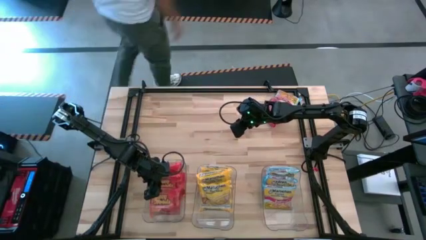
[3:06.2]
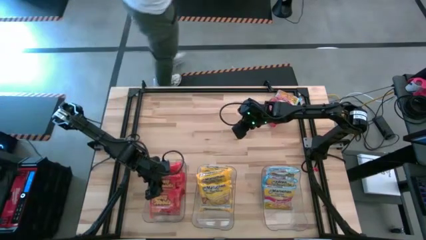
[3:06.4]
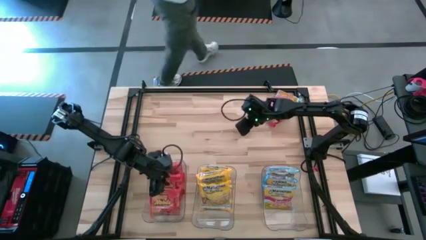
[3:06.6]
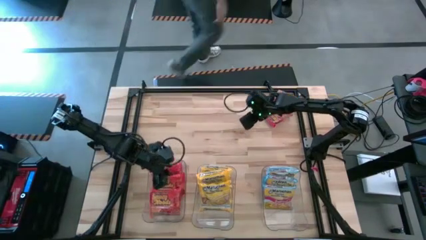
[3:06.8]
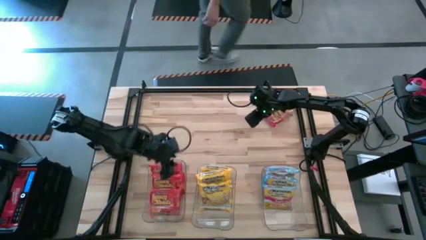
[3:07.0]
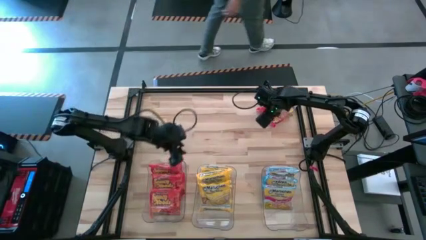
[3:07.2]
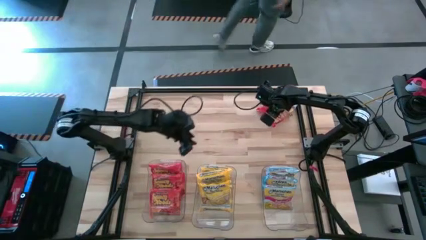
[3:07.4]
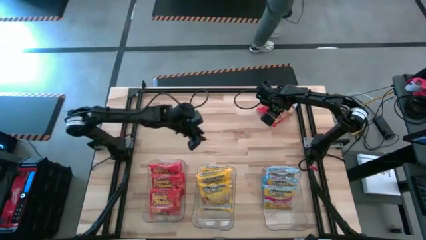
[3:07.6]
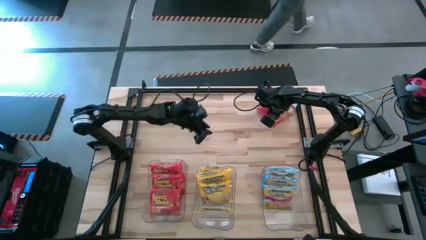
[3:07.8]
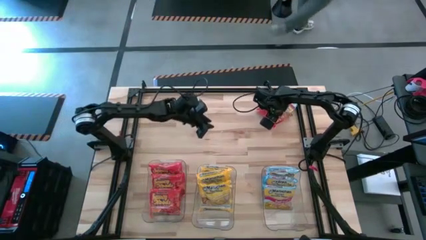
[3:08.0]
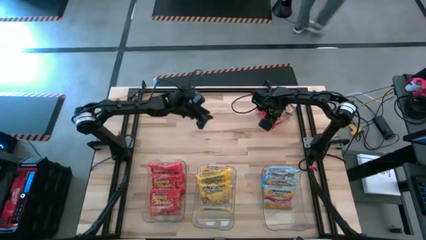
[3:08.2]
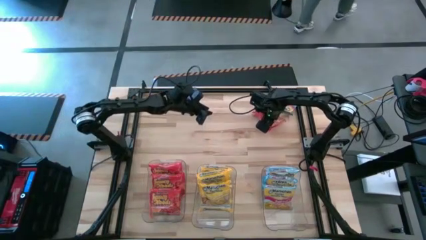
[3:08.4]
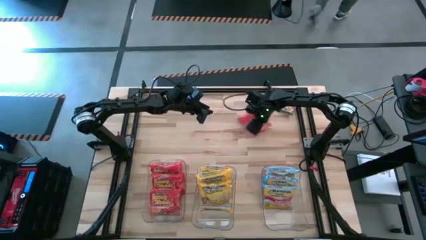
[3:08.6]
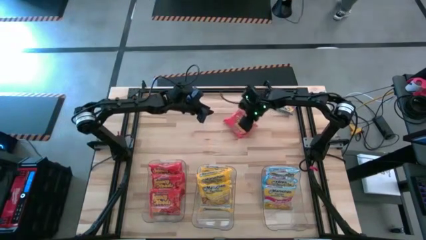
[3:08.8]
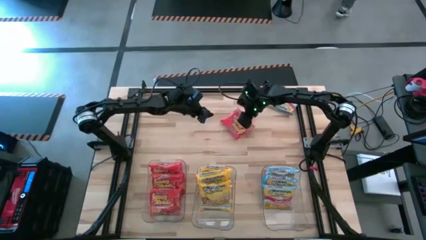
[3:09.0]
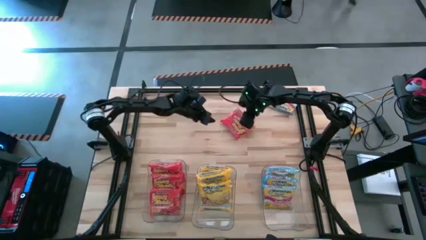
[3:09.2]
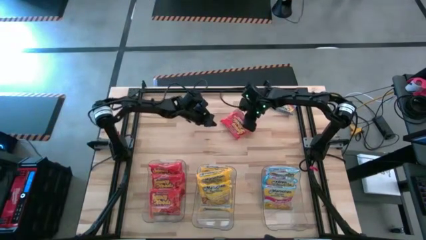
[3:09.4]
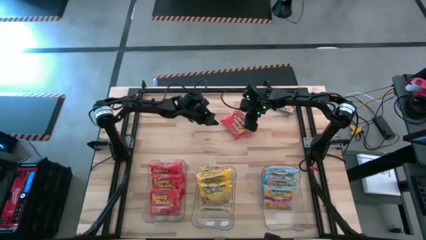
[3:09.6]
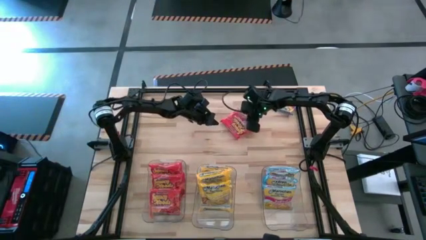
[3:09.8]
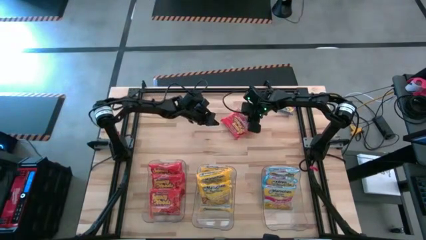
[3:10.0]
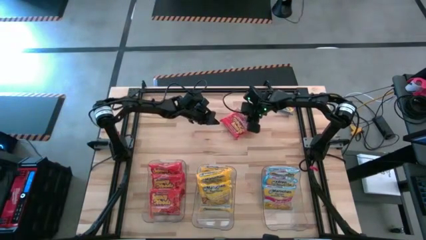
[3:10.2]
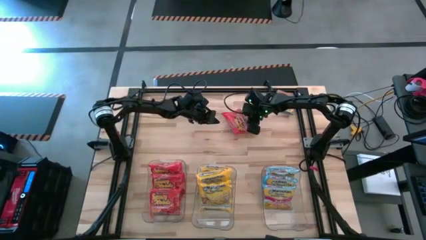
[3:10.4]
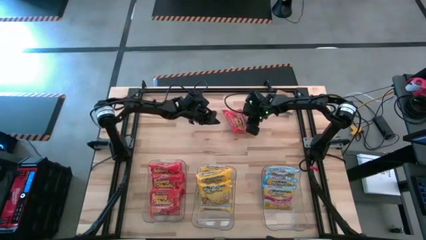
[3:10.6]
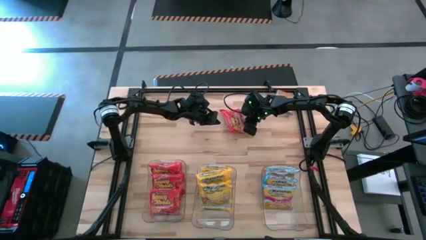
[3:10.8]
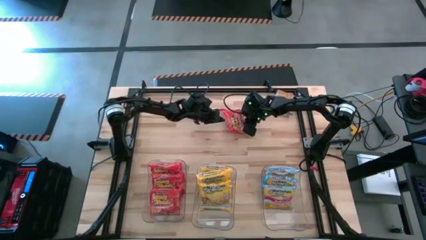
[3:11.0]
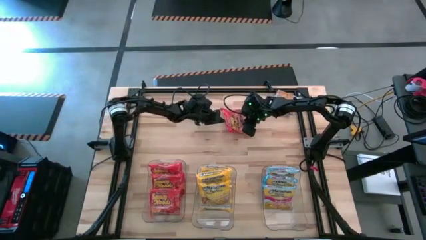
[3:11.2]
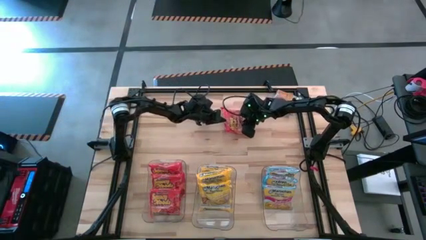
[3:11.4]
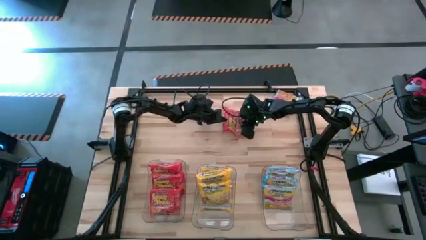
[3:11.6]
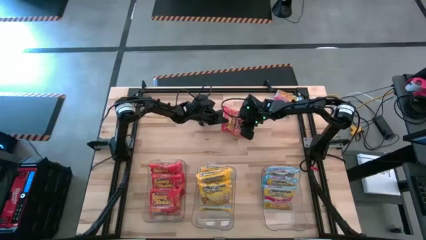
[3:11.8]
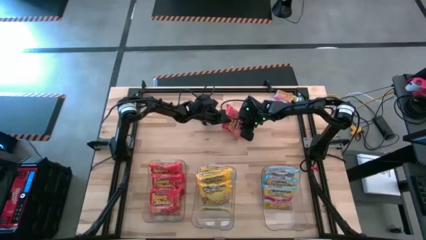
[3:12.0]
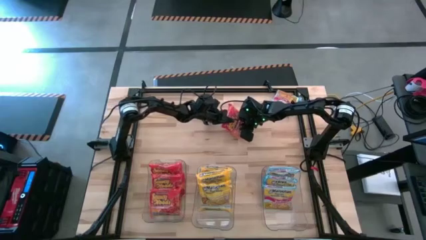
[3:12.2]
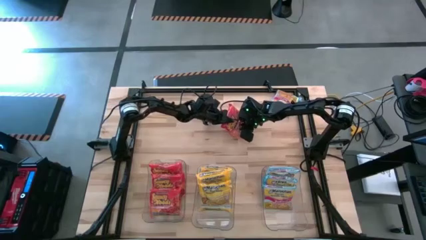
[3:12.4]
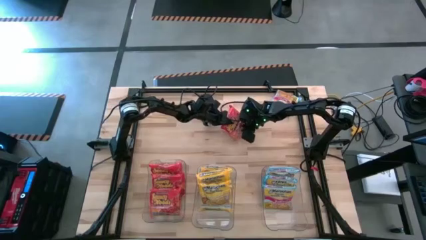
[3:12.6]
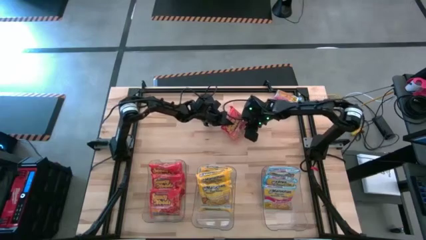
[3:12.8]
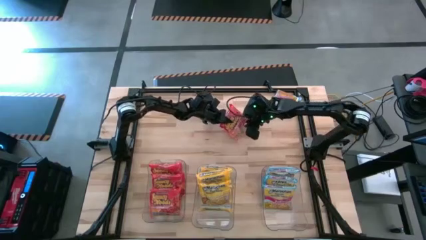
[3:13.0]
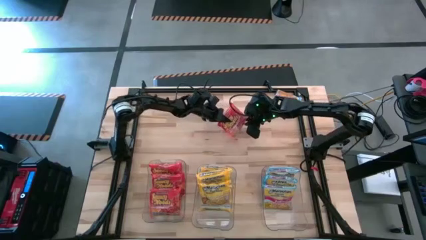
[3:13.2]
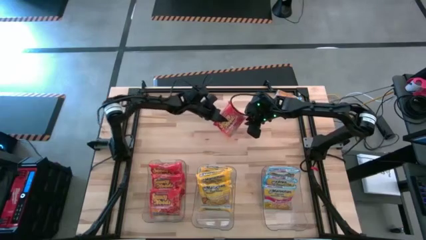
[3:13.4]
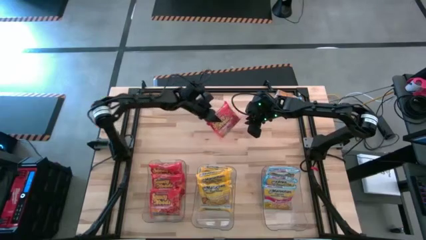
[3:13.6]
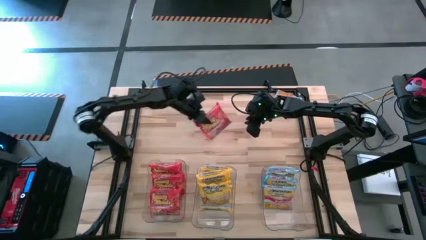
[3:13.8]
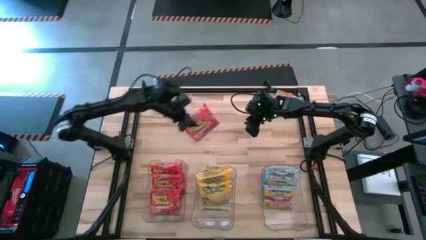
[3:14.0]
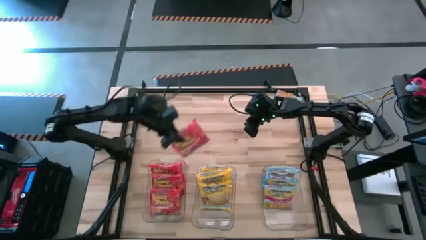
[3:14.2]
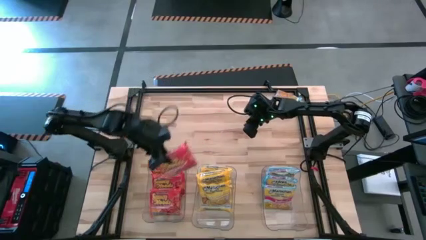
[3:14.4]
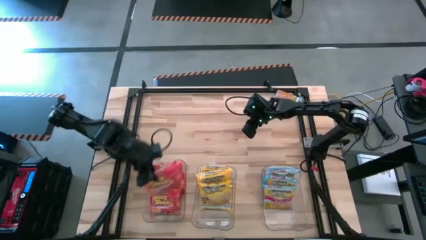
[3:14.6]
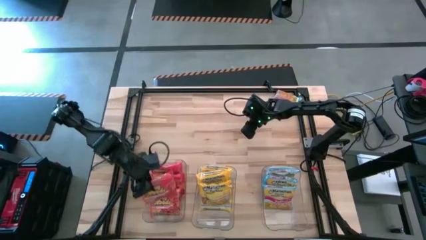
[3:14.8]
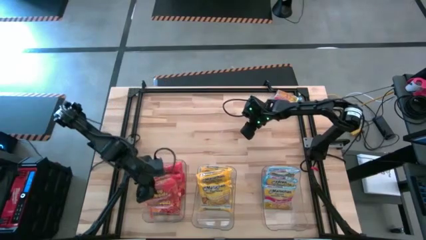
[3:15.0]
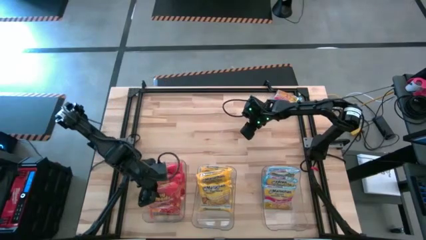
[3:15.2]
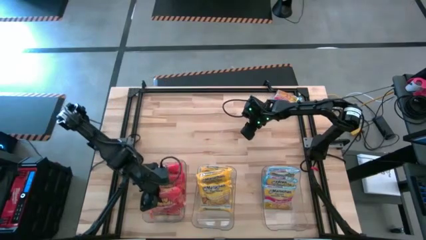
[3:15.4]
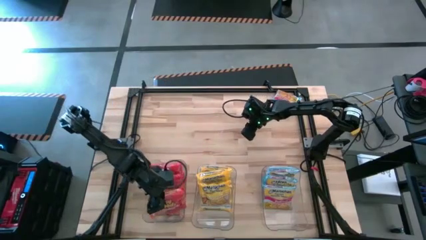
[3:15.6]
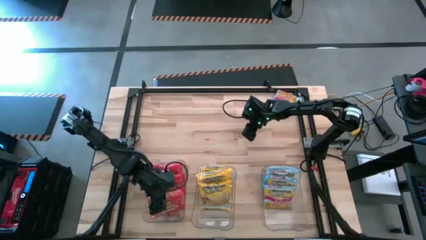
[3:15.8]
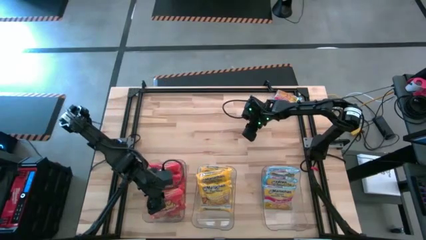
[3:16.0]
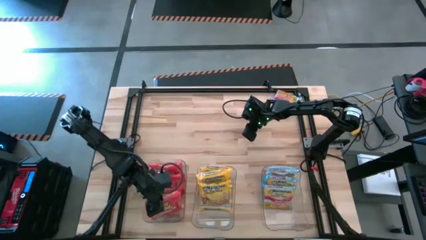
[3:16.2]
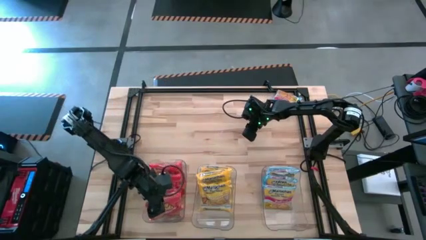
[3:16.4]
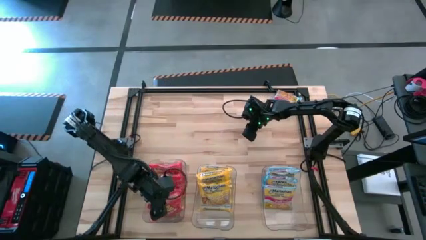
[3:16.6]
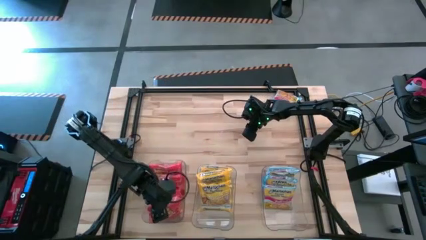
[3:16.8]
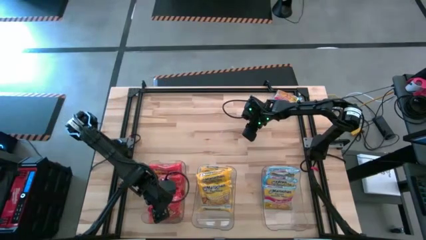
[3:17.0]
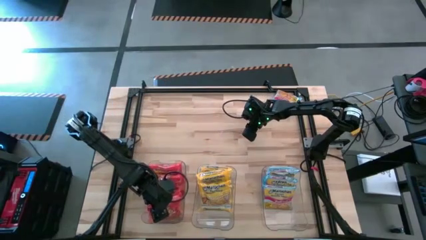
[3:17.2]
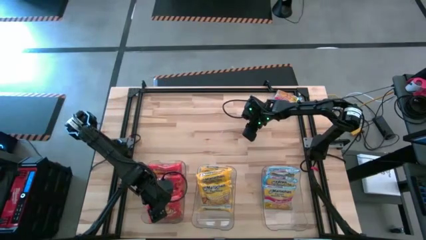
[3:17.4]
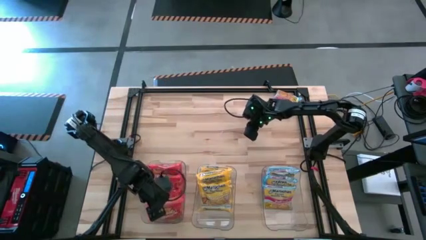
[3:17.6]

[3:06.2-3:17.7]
Task: Sort Maruchan noodles
Put the orange noodle pack into the left transparent bin
